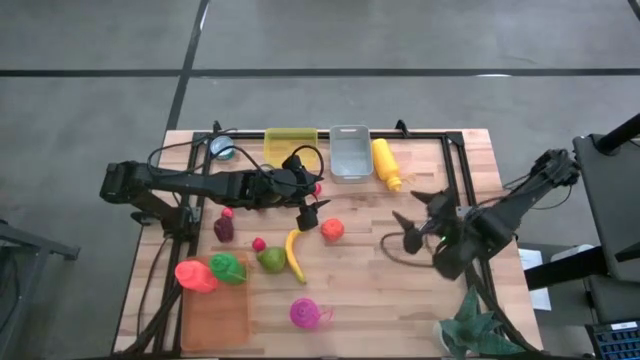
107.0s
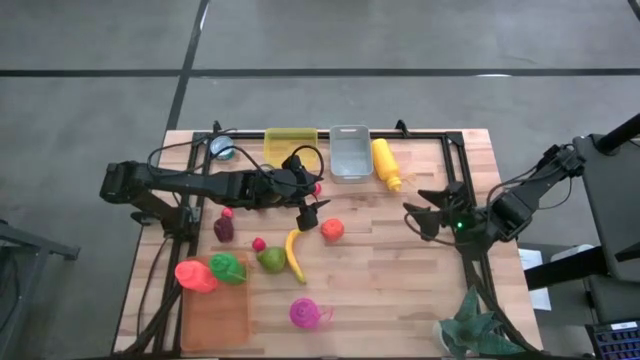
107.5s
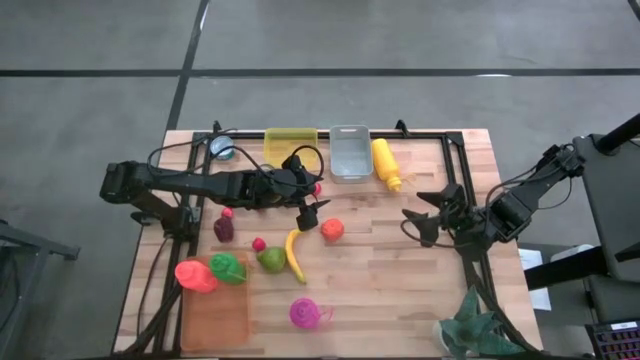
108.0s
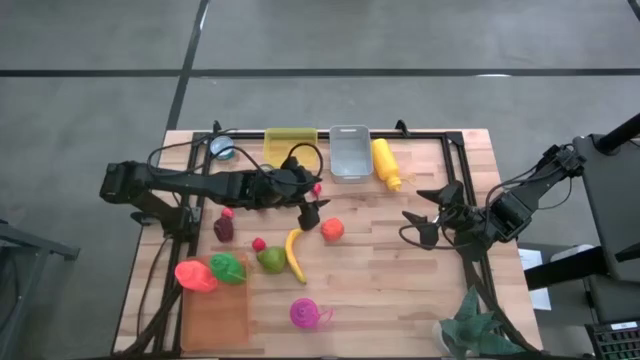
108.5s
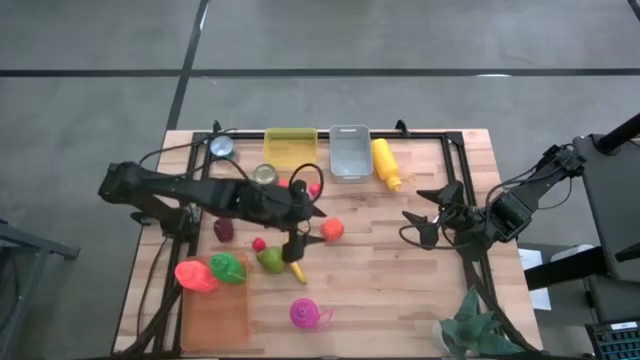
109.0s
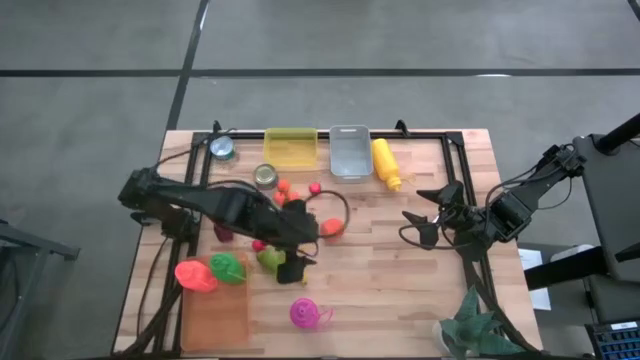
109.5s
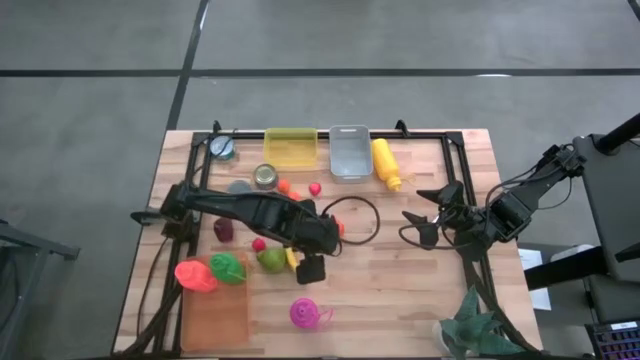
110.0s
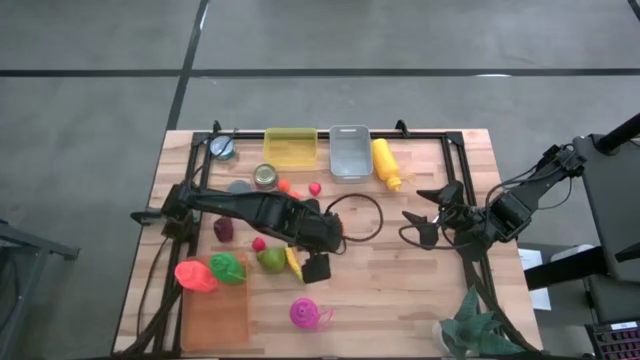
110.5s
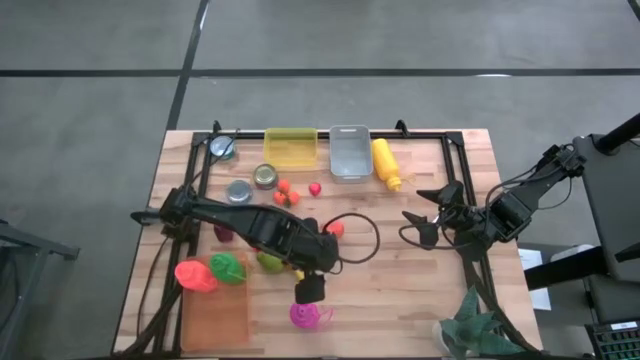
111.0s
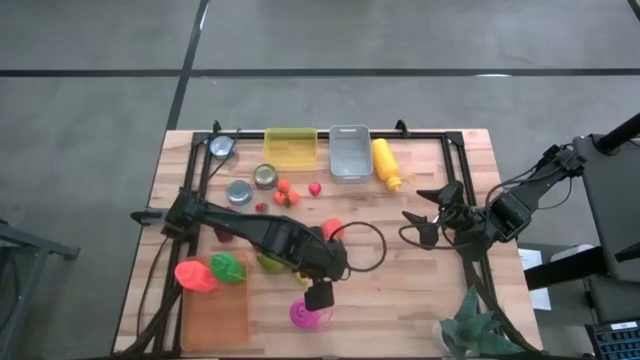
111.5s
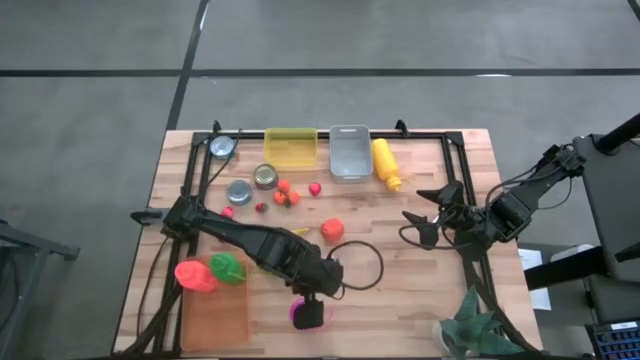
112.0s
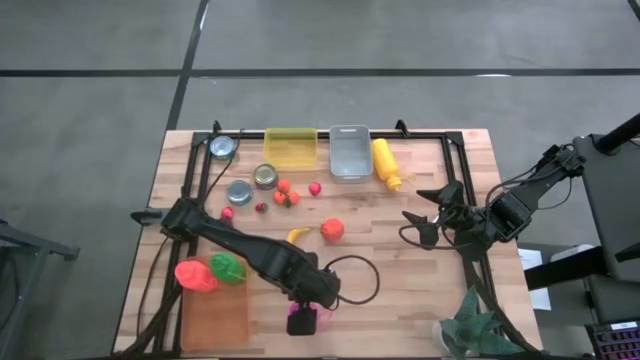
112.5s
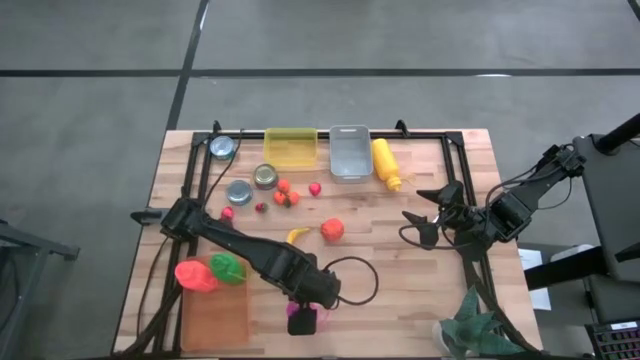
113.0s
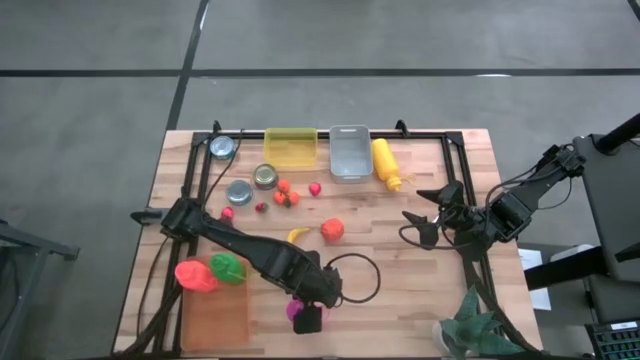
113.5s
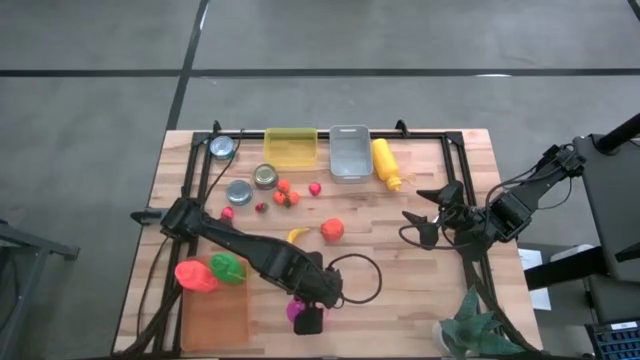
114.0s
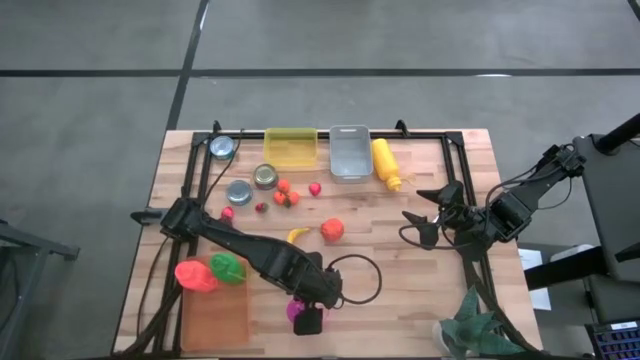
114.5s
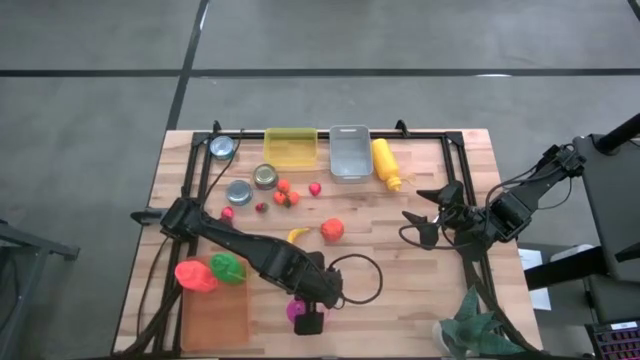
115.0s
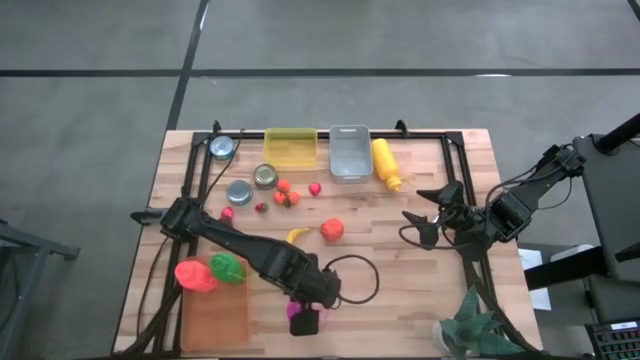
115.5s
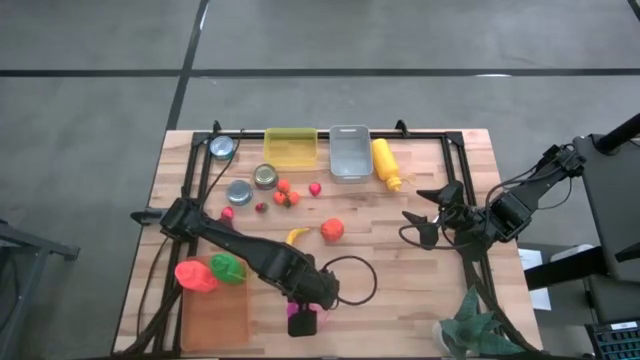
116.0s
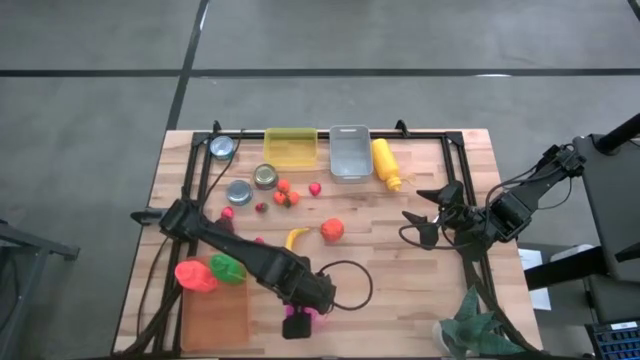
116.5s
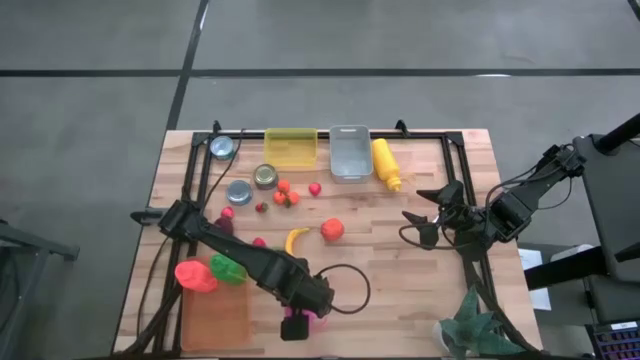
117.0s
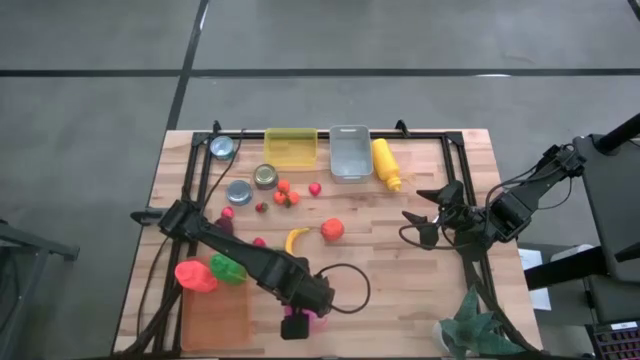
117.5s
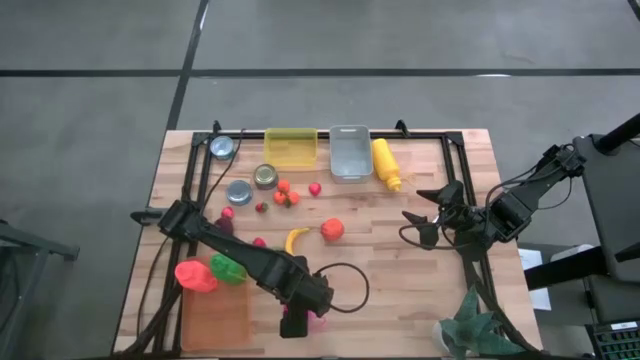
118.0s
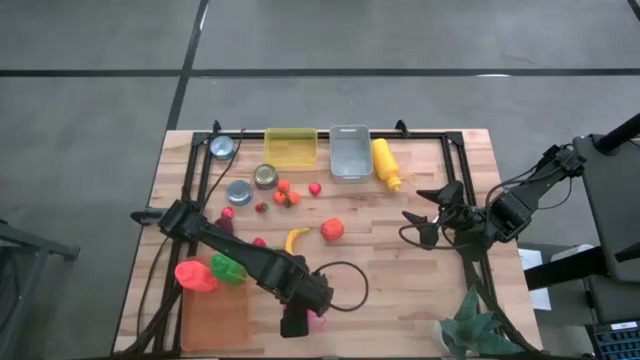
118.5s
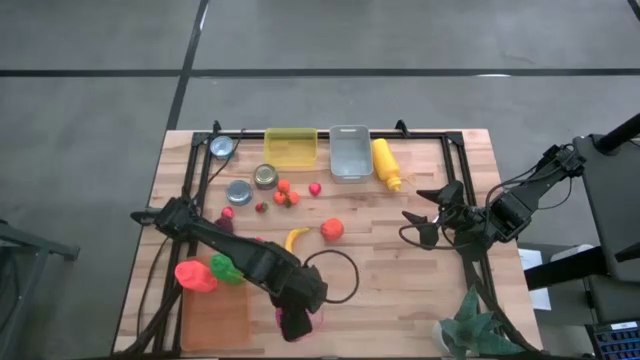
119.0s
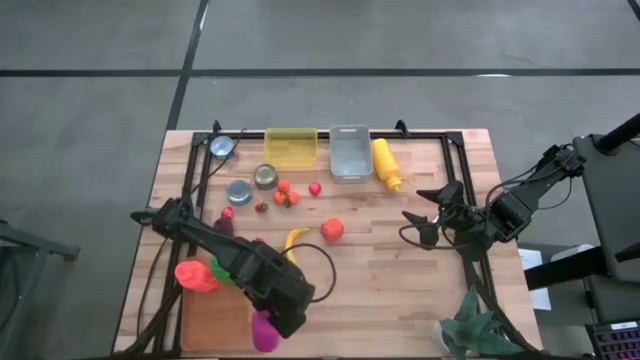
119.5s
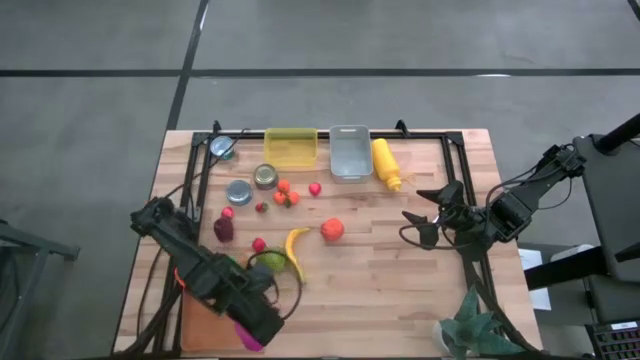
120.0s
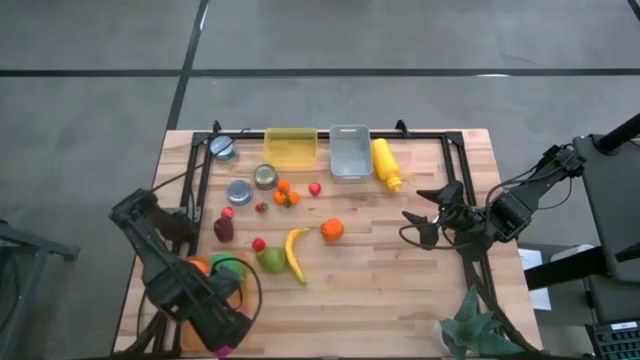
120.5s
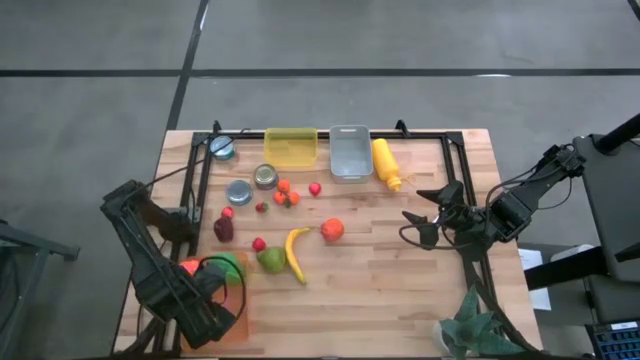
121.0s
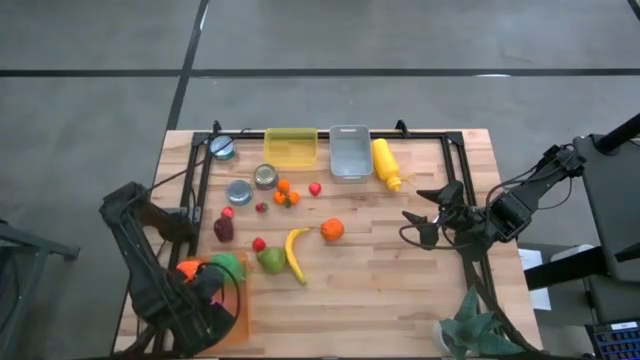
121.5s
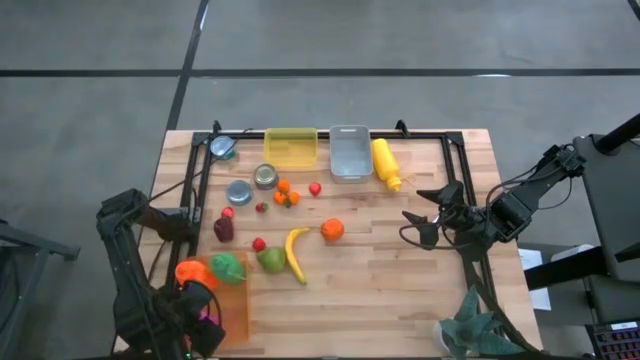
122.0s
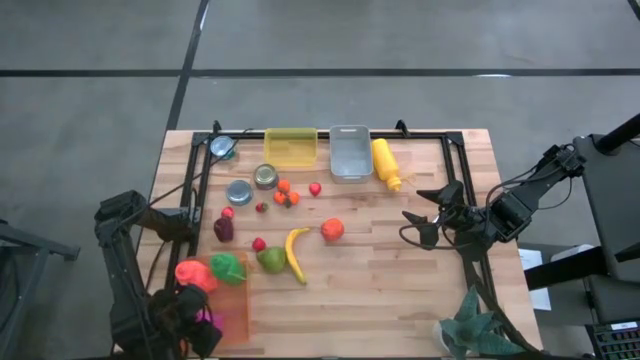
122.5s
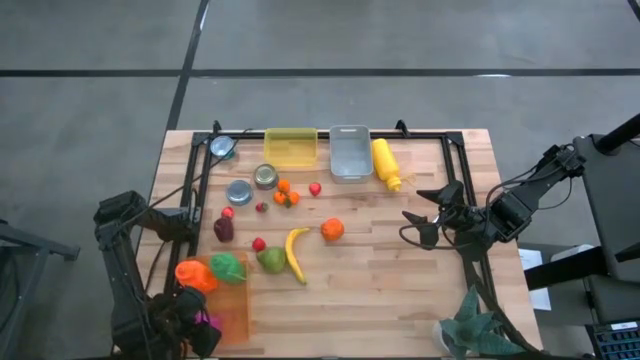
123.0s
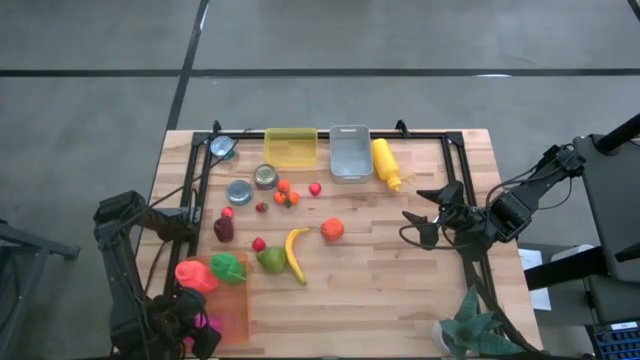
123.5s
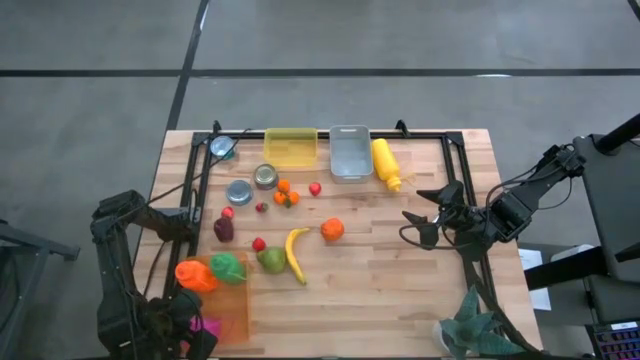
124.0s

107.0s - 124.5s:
Task: Pick & Place Food Item
Put the pink tumbler into the orange bin

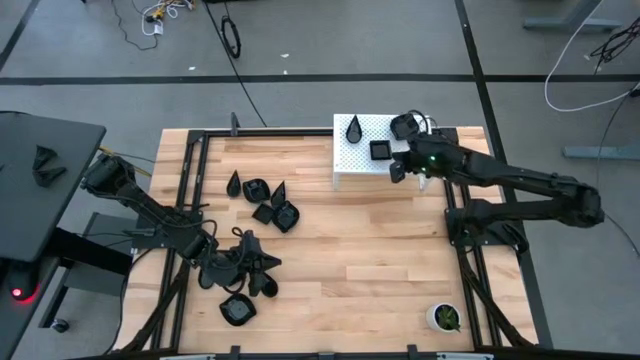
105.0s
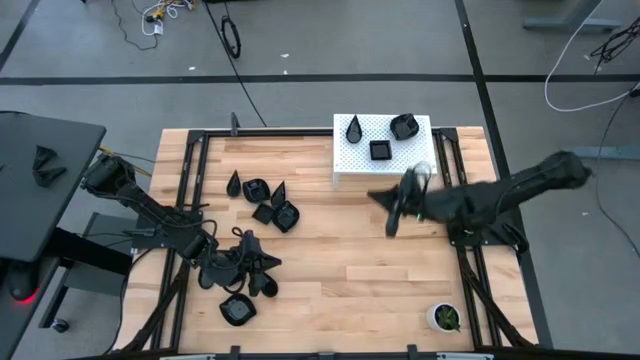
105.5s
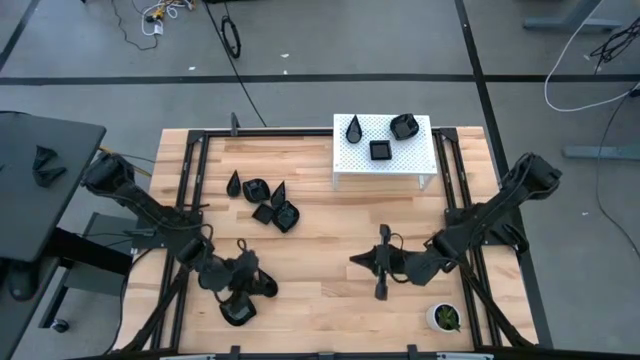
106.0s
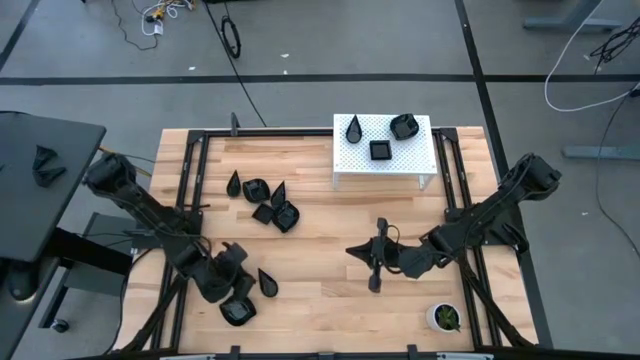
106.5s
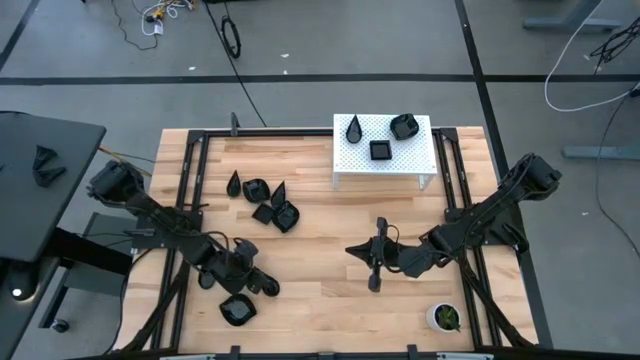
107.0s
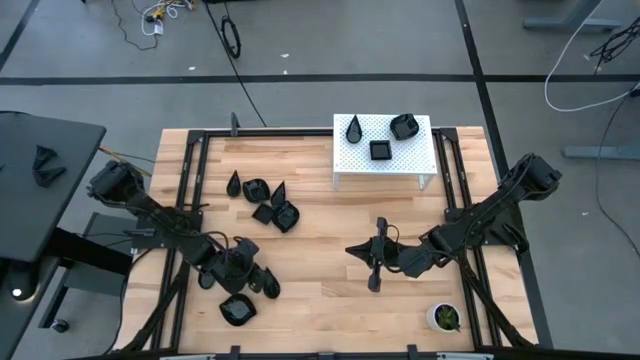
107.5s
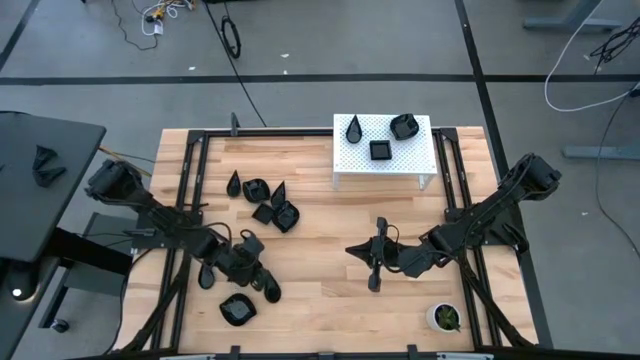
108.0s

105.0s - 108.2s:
Task: Pick & Place Mini shaped plates
Stack the black drop shaped plate on the black drop shaped plate on the shelf

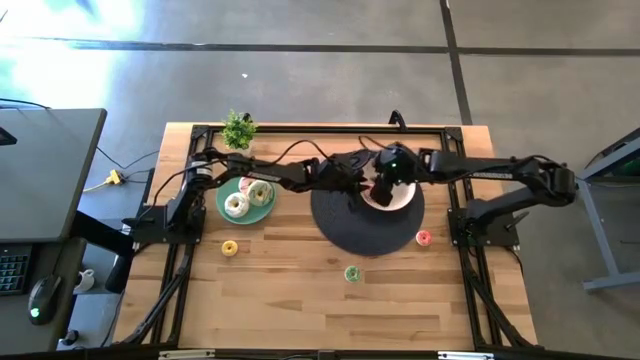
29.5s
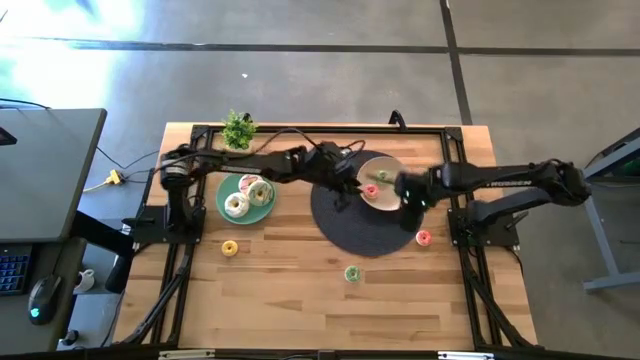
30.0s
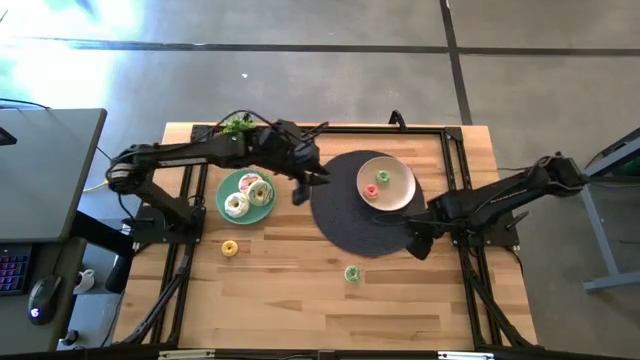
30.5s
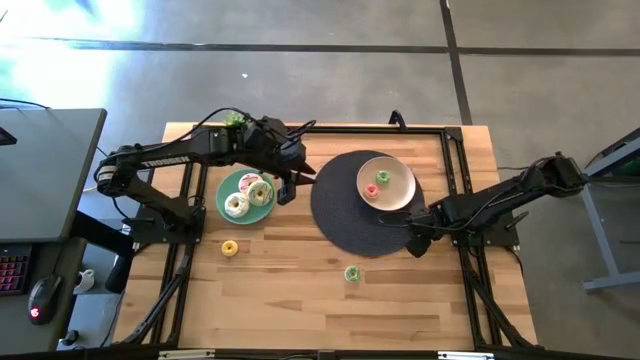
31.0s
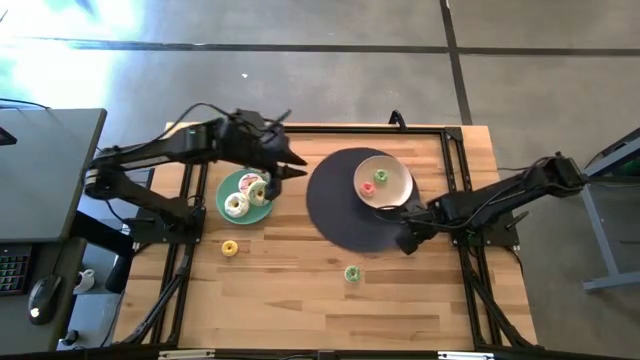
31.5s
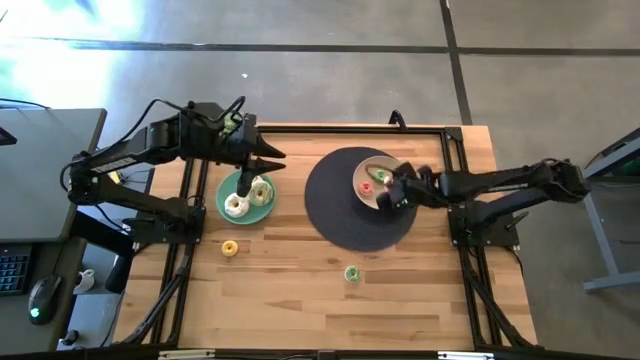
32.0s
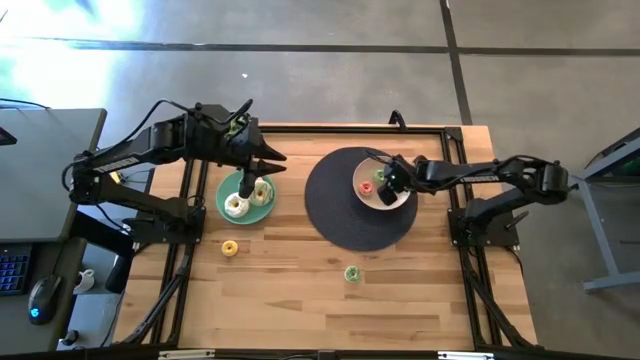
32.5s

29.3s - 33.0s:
Task: Pick & Place donuts
Put the pink donut into the white plate
